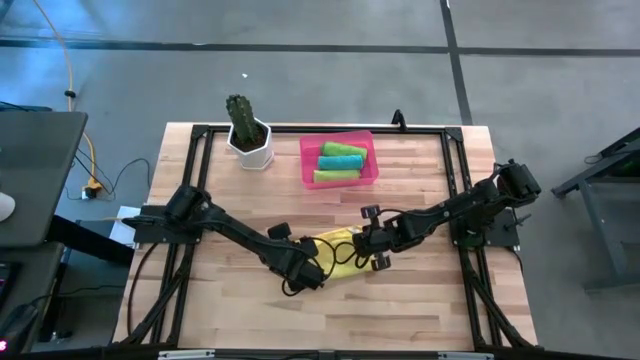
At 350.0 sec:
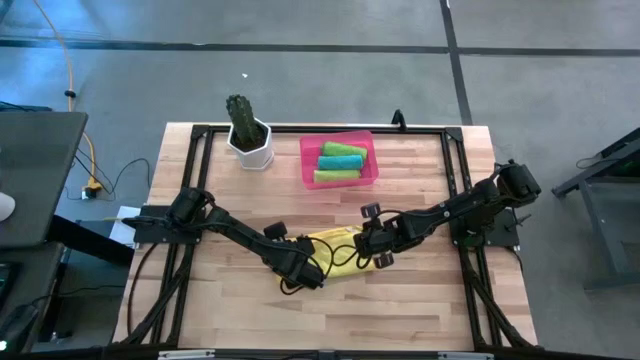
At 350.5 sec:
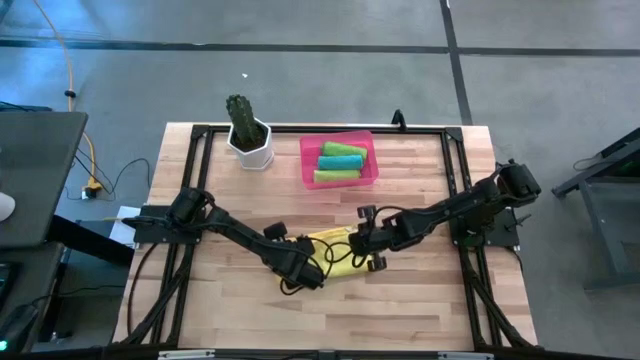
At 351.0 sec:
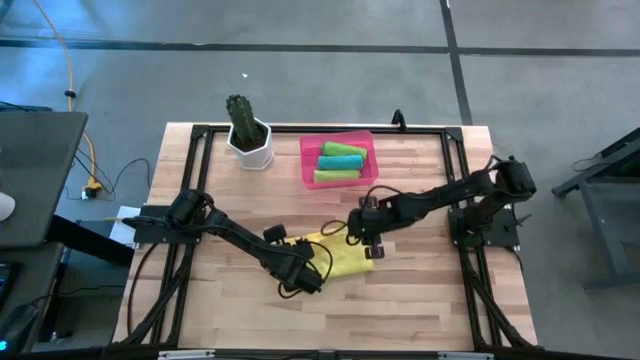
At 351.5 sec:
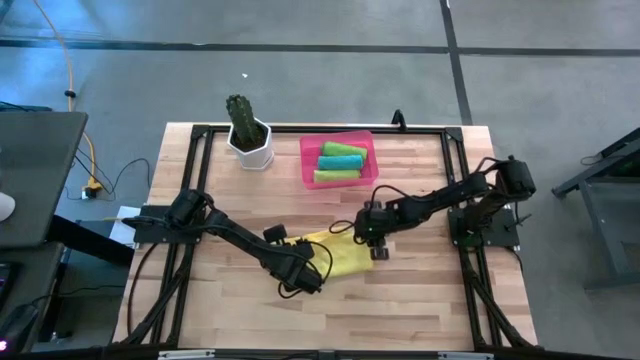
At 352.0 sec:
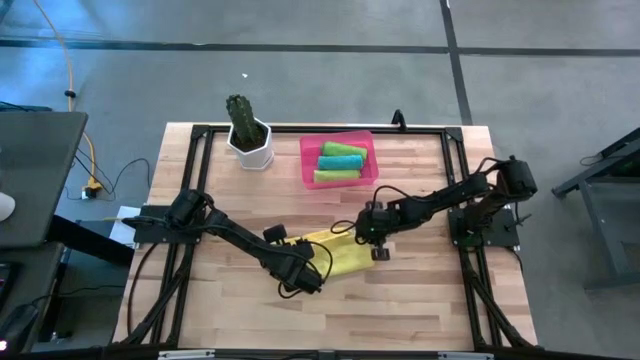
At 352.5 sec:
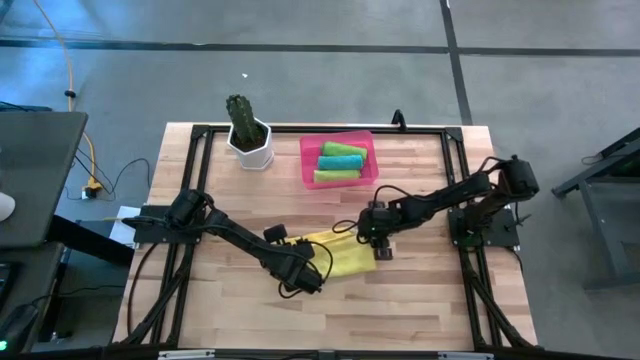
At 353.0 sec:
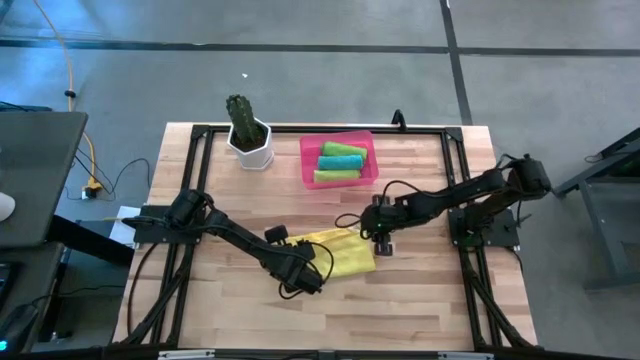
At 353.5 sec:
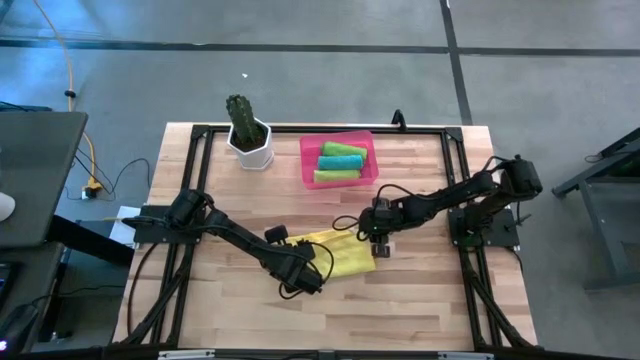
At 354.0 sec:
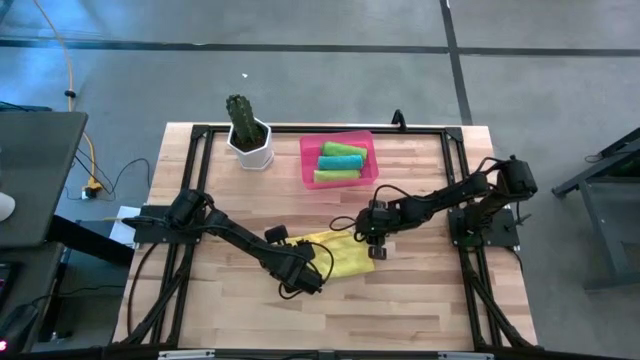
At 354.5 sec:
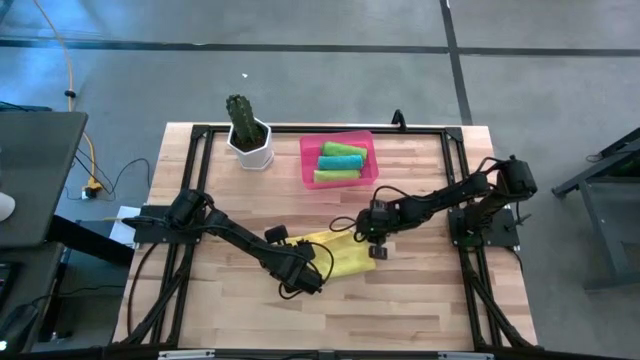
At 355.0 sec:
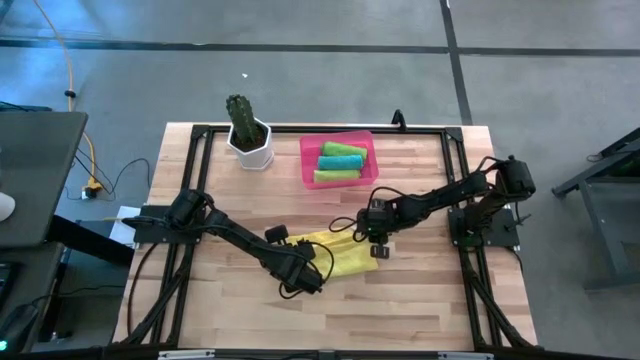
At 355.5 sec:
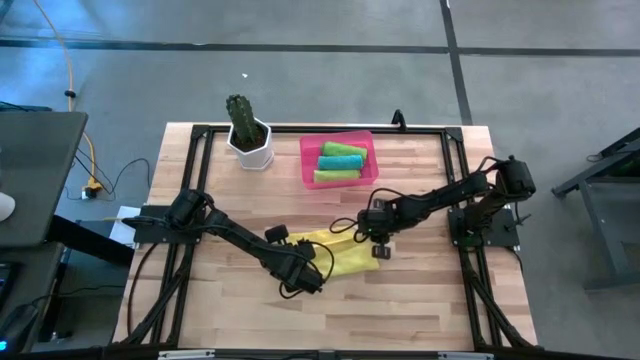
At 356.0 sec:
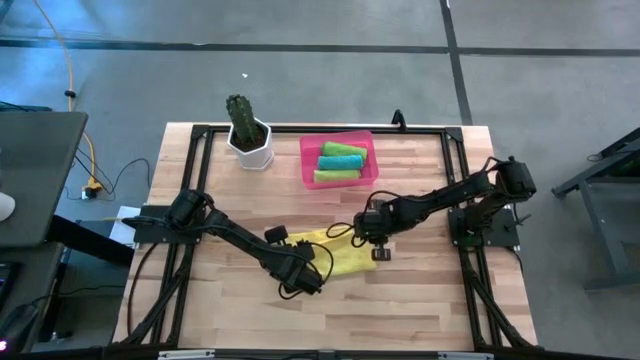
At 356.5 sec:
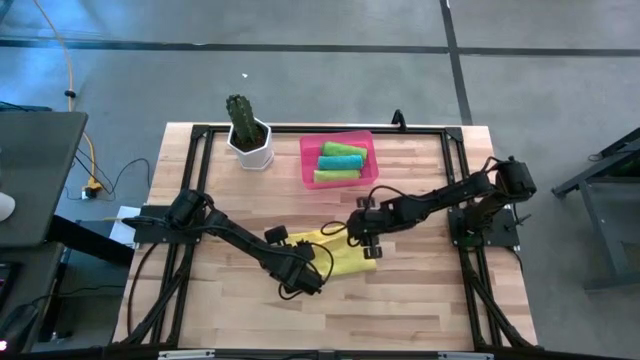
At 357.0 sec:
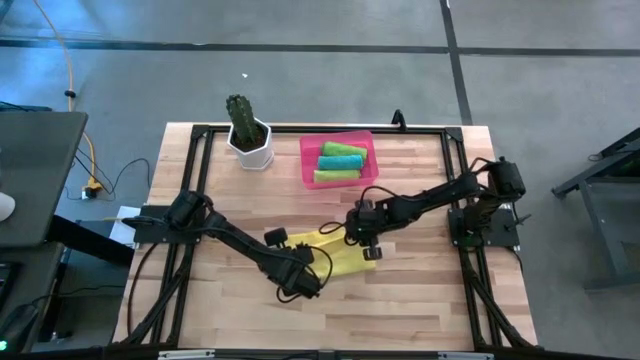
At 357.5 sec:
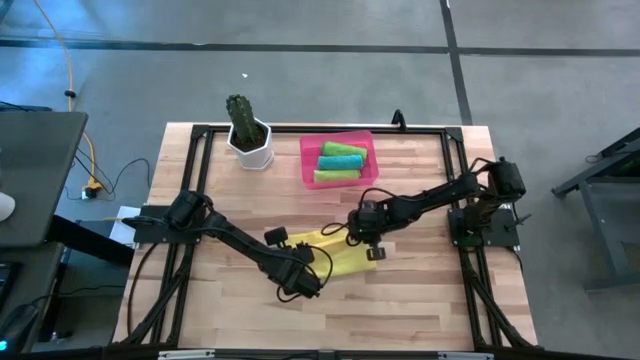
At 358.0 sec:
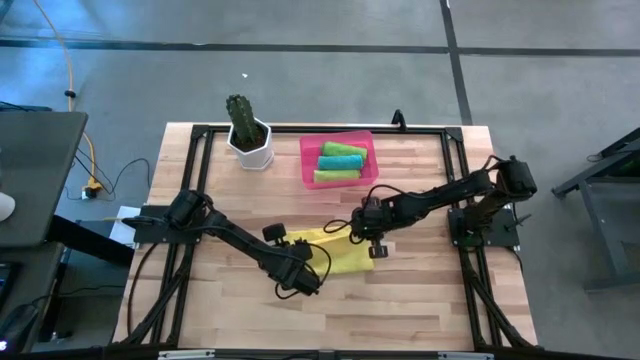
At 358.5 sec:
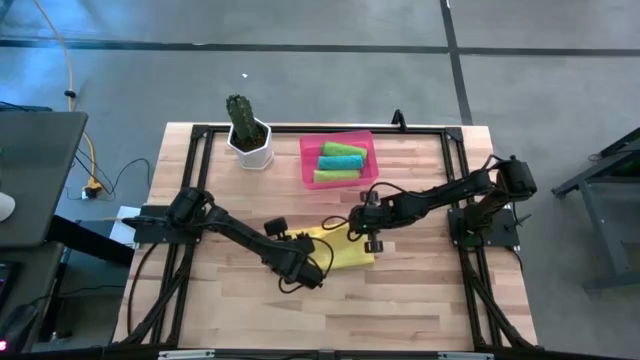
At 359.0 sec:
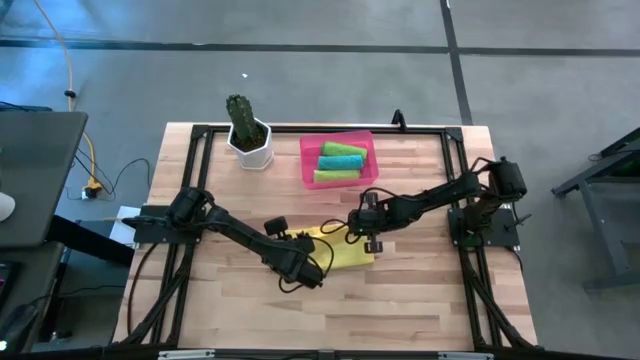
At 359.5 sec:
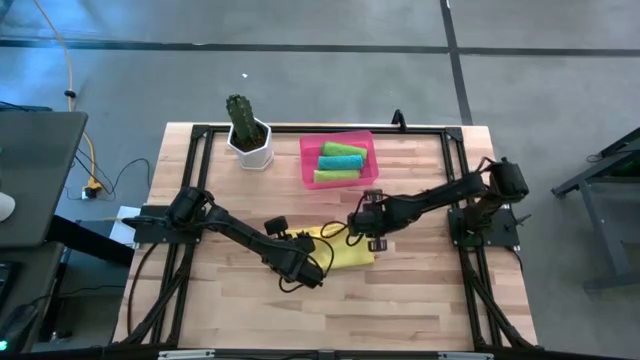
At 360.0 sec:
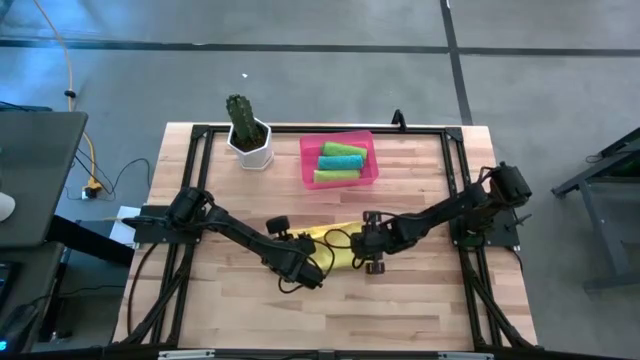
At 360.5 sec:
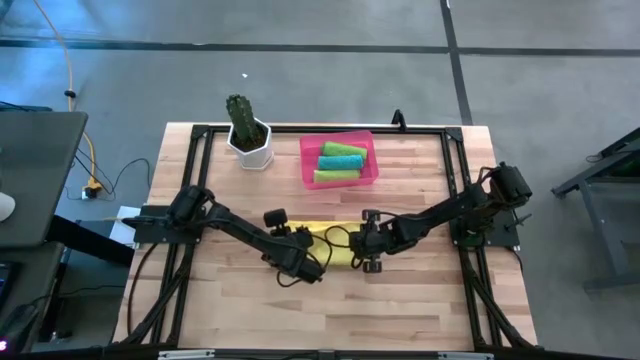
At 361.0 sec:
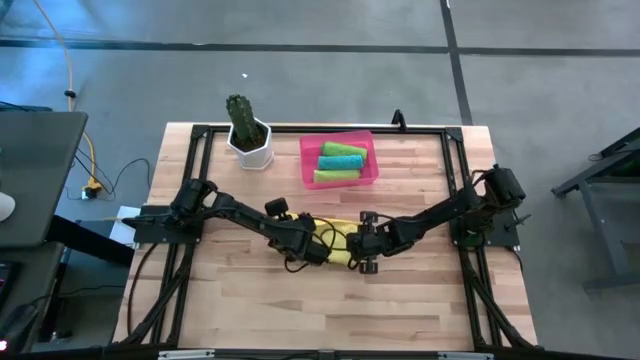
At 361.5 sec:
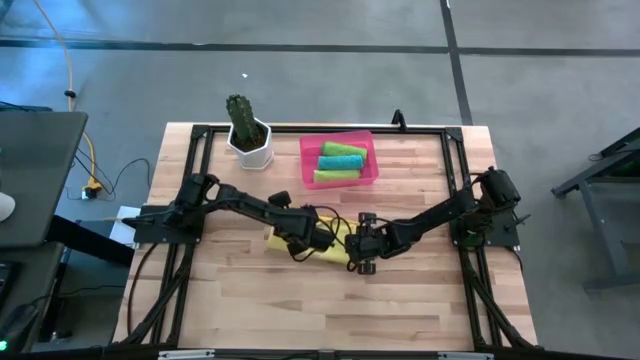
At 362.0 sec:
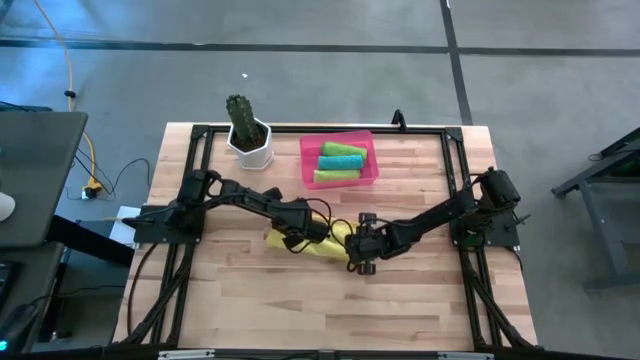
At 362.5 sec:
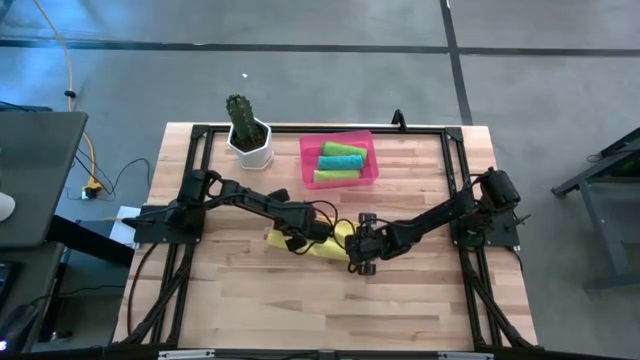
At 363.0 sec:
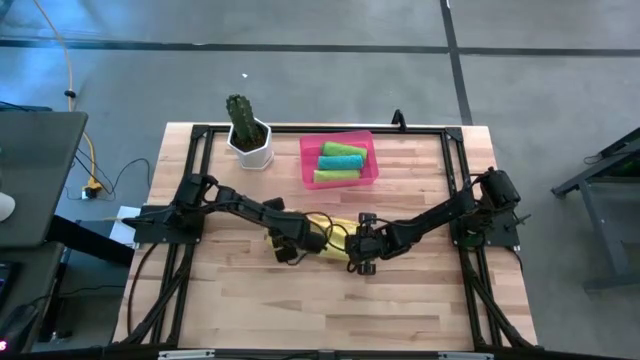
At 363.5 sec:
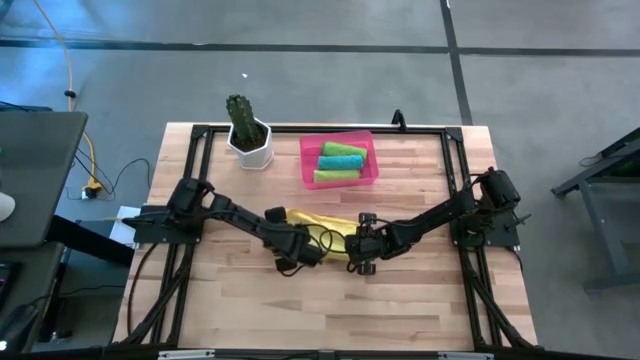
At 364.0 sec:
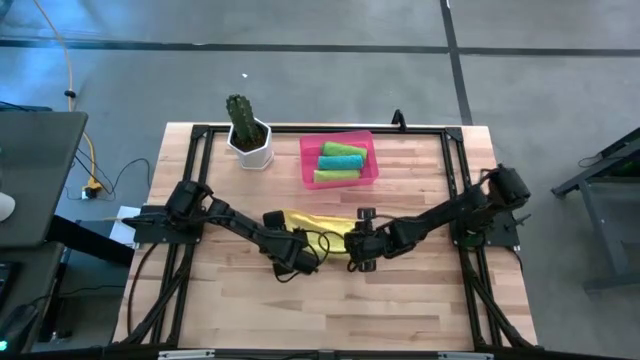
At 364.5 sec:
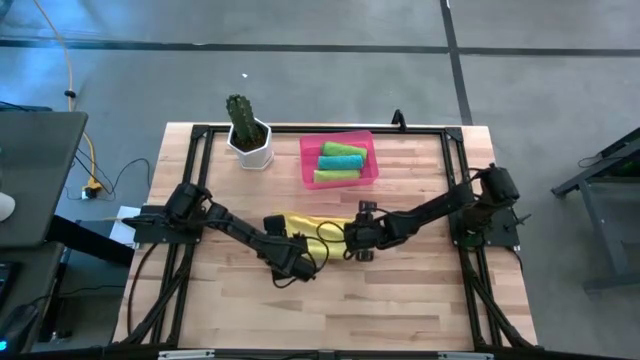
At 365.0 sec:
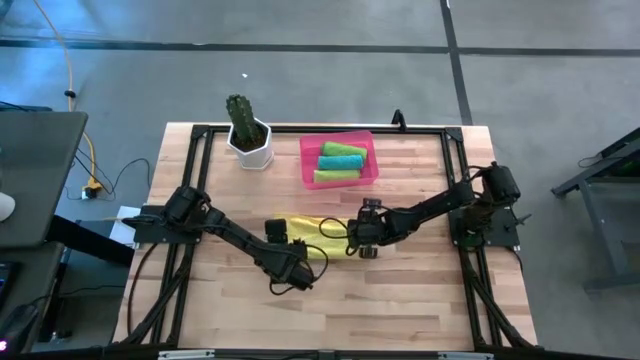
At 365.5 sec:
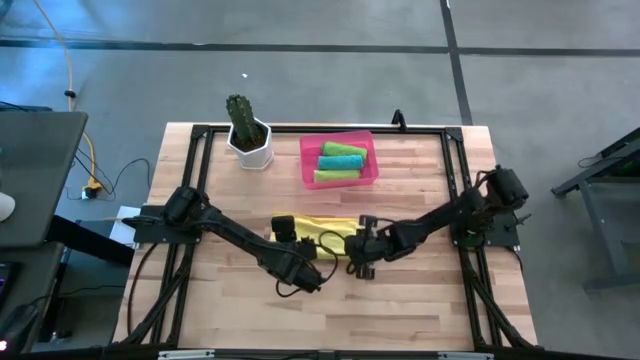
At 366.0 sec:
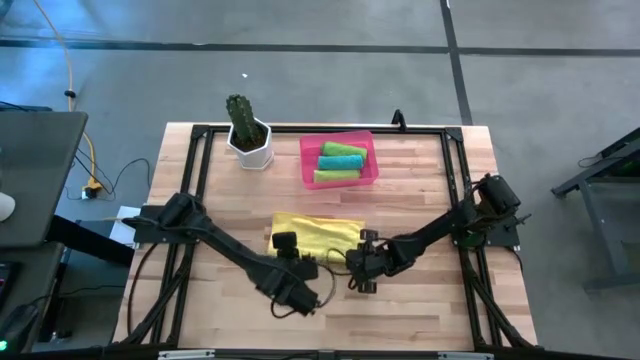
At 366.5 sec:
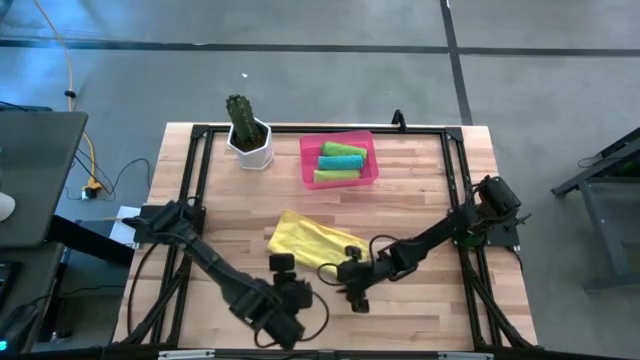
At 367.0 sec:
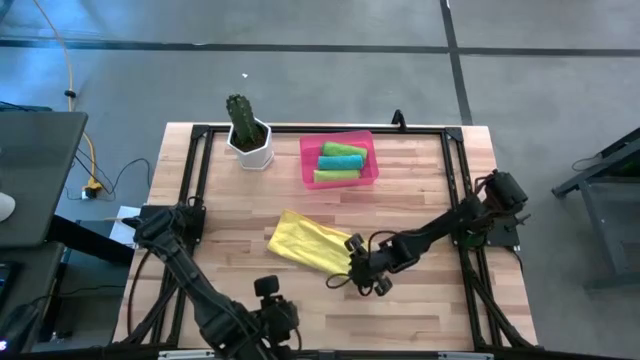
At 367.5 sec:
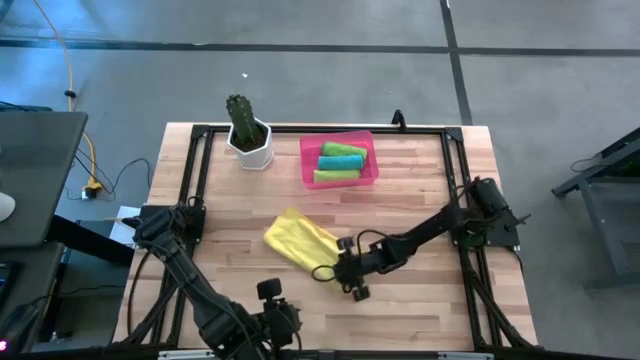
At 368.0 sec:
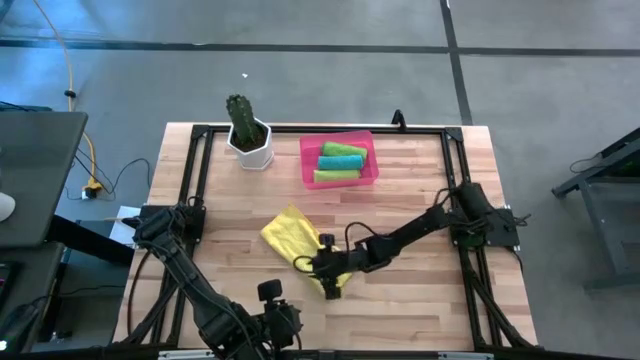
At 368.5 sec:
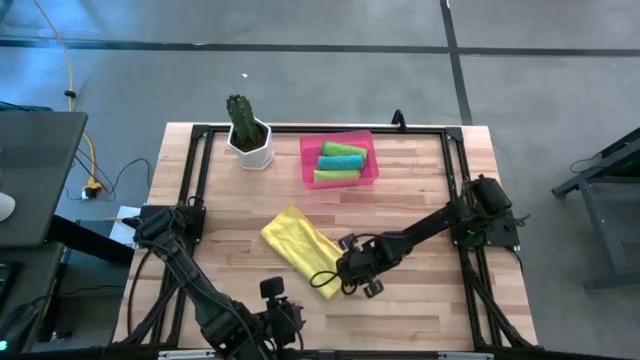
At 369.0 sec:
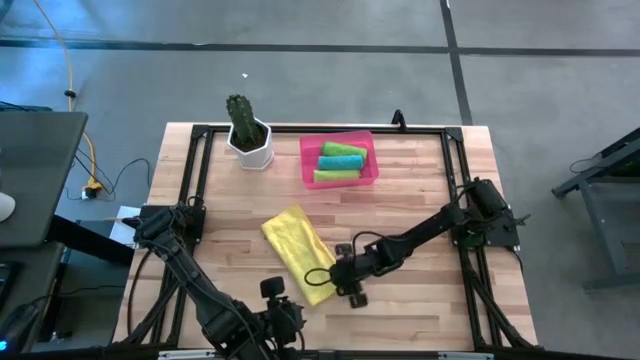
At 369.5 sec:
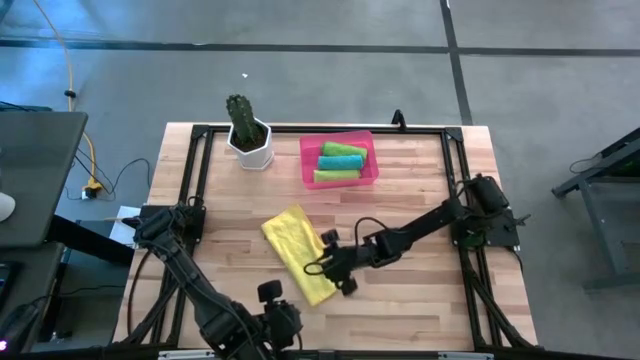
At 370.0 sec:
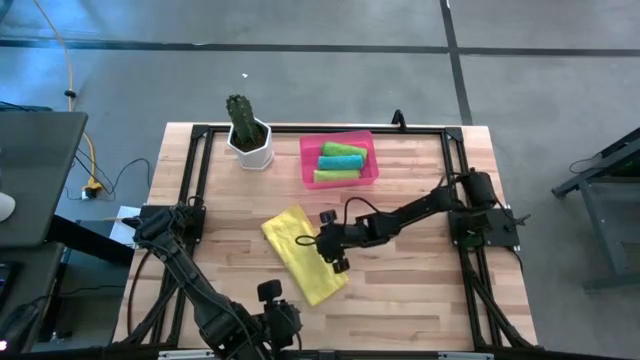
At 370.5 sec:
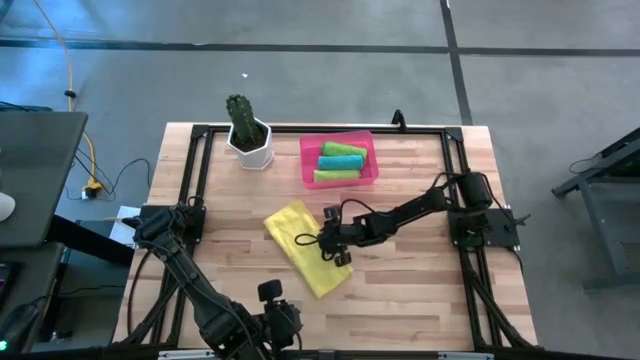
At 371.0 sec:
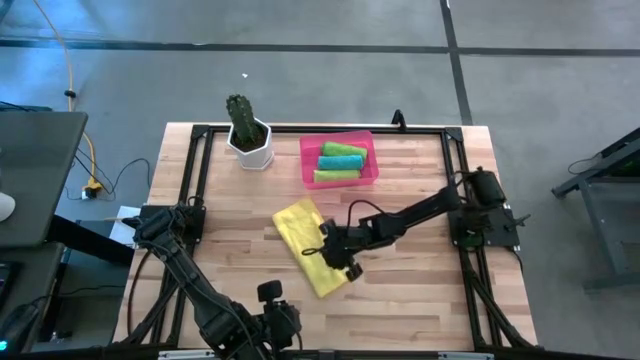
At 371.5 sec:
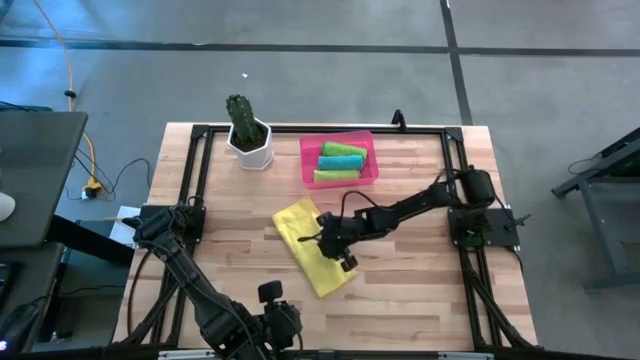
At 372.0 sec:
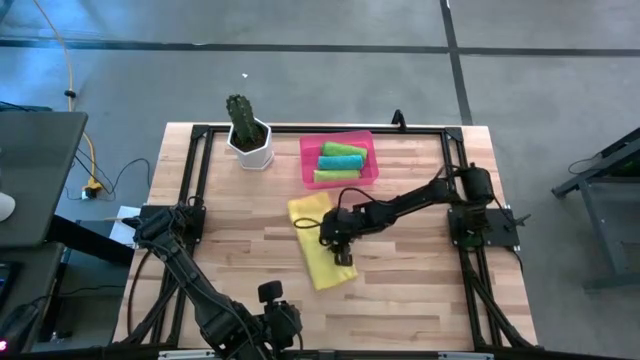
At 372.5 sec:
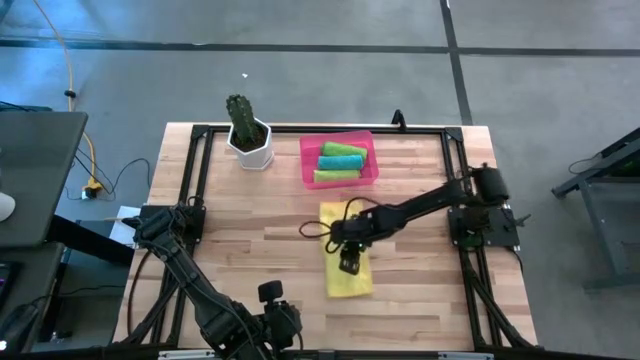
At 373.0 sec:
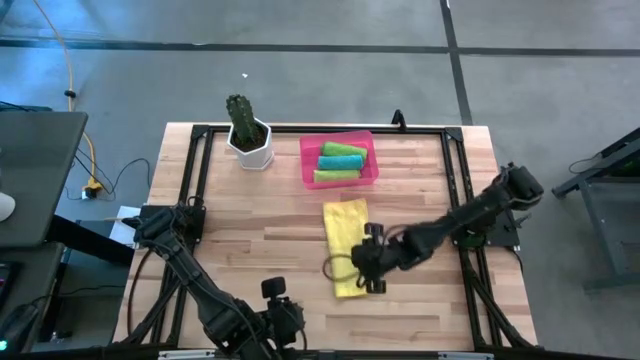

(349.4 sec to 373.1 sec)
Task: Roll microfiber towels into tight, uniform cylinder then place into a basket
Roll the yellow microfiber cloth
